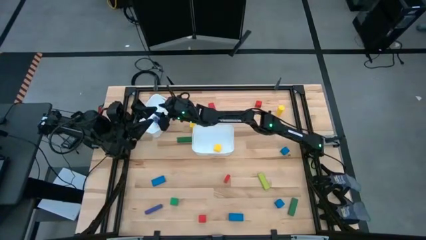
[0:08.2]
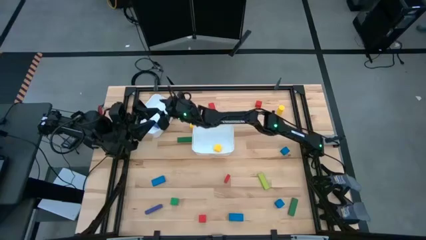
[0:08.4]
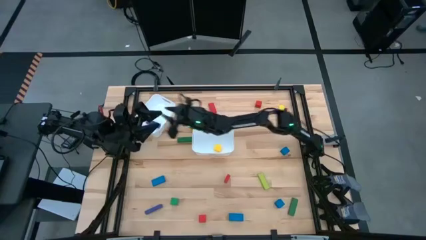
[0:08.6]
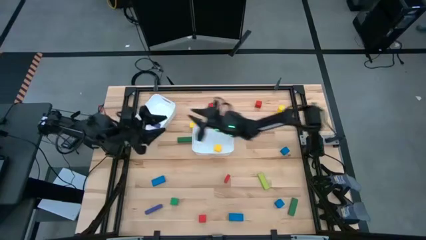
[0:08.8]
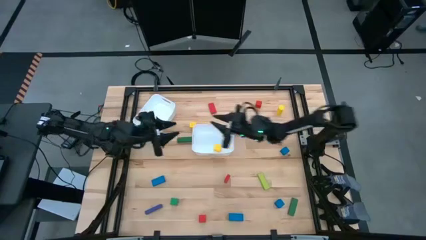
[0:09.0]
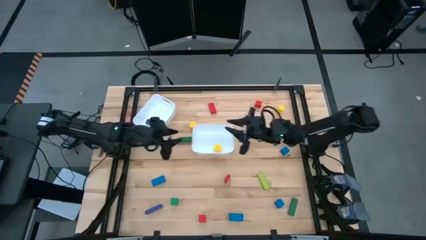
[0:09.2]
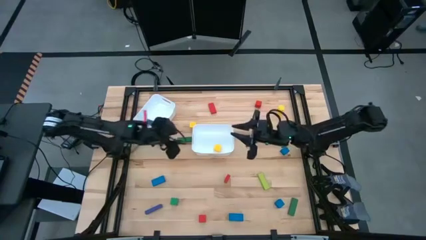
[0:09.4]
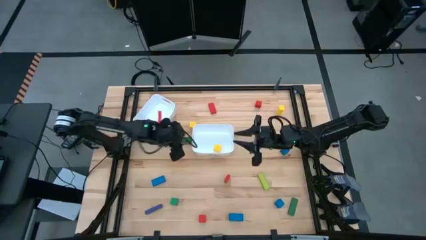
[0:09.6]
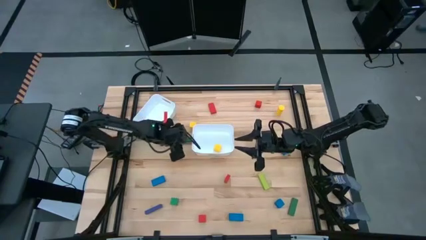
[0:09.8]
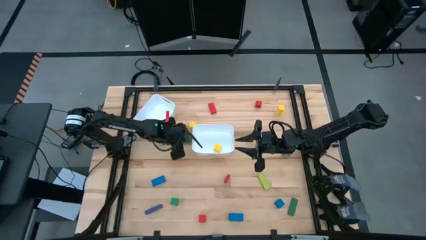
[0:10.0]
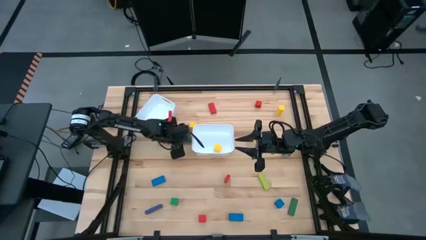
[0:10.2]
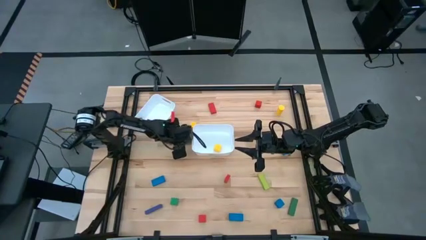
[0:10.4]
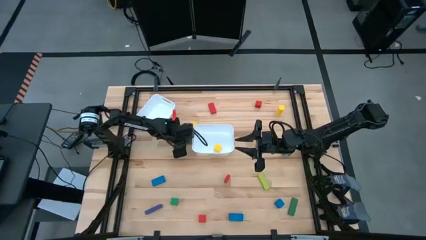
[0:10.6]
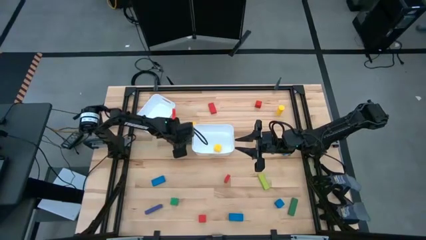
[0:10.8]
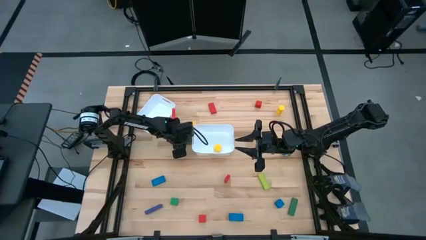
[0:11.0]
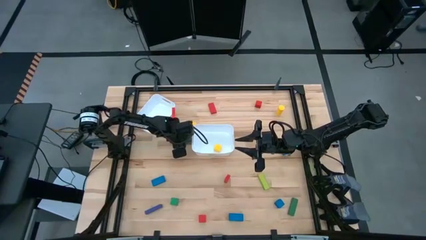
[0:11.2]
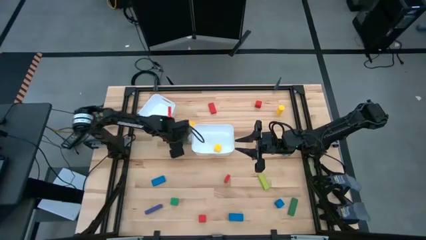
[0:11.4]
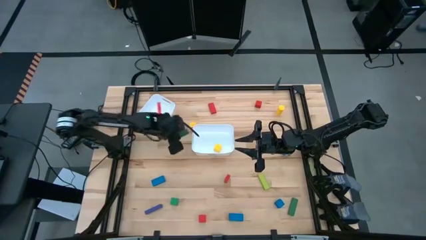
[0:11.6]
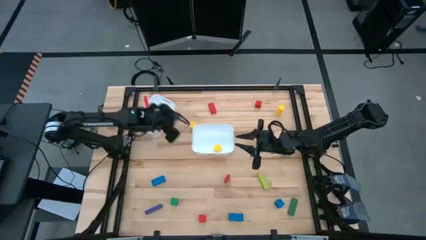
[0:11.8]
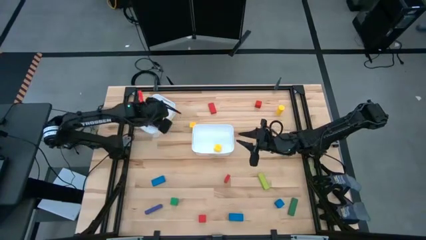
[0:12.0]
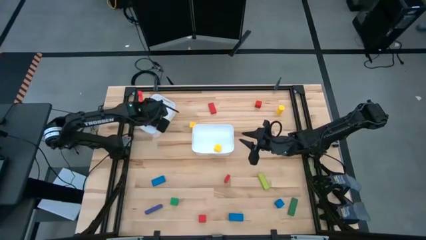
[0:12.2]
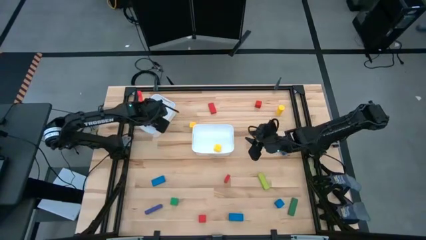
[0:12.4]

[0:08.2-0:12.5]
Task: Sort blocks by size
Put the top green large block into the top white bin

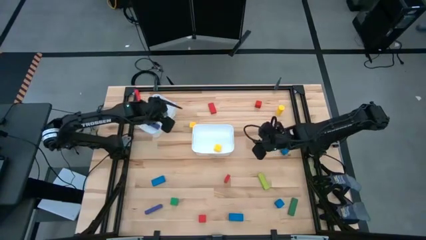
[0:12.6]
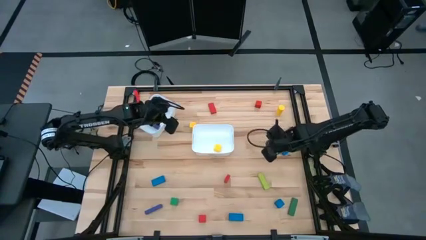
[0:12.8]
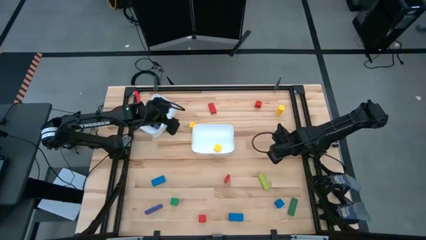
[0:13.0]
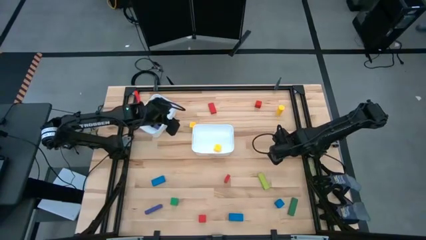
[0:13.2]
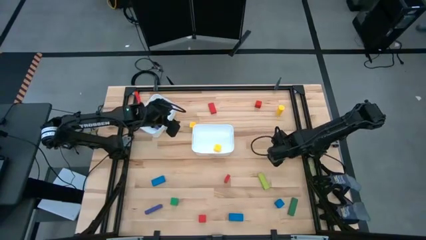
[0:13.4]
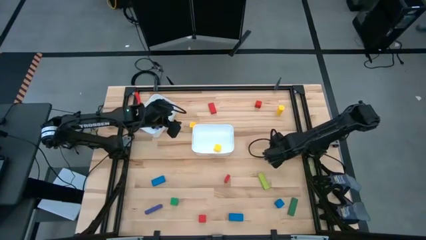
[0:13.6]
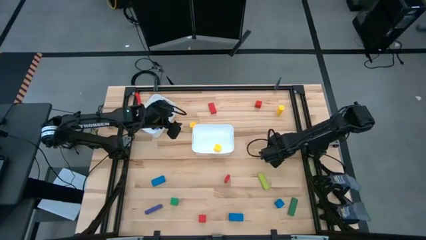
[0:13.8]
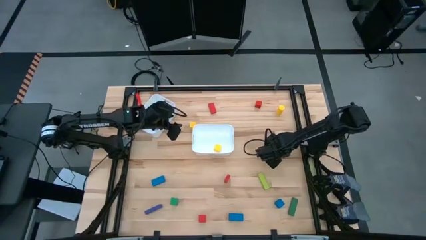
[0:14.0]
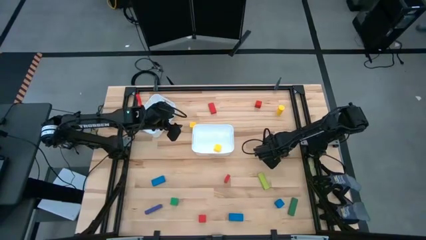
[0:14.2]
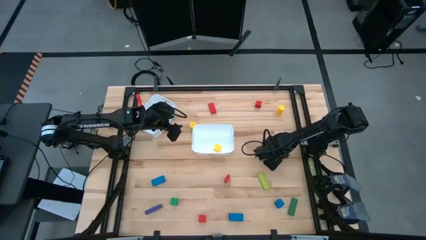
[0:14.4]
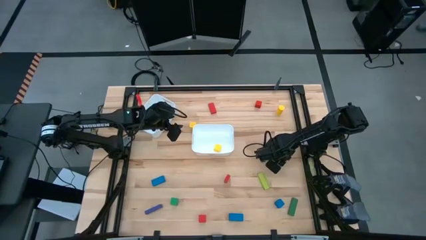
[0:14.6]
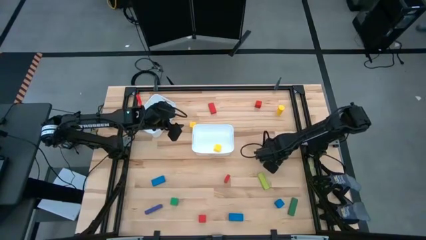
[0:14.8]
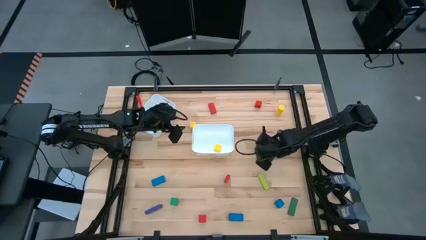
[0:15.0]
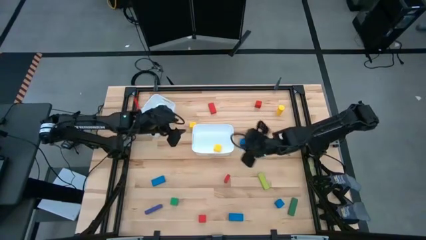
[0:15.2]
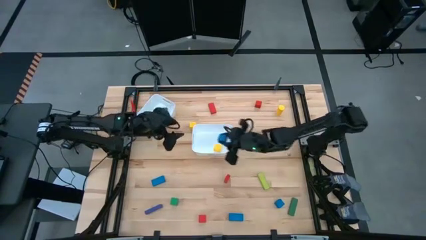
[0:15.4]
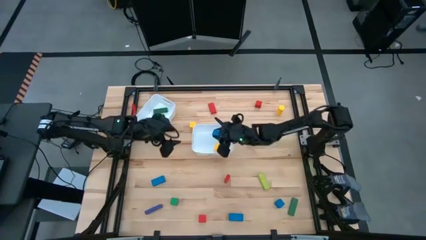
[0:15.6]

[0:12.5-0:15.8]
Put the top blue small block into the bottom white bin

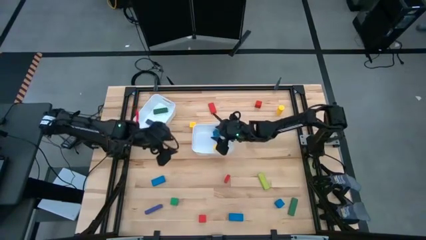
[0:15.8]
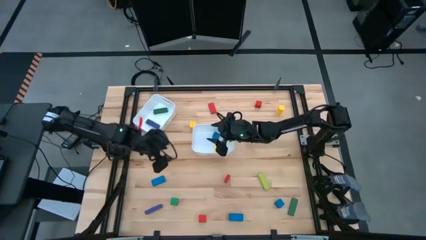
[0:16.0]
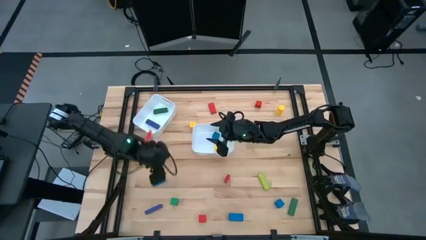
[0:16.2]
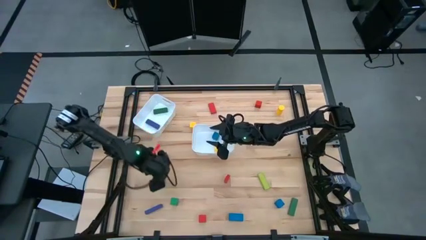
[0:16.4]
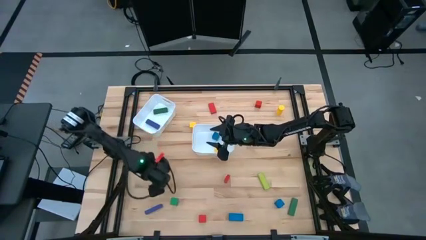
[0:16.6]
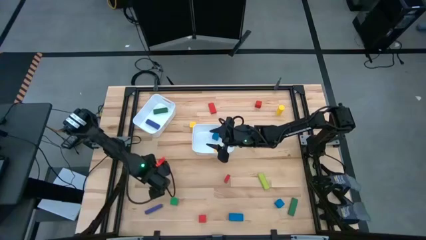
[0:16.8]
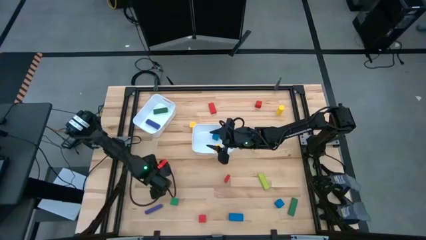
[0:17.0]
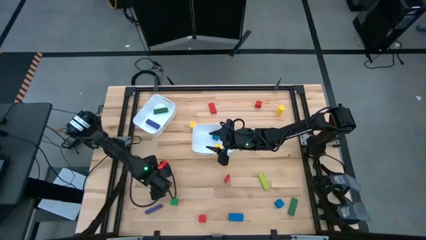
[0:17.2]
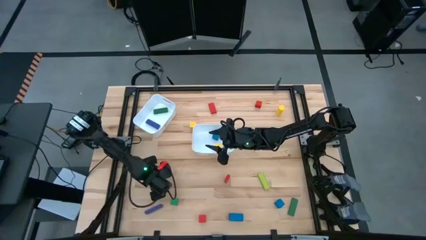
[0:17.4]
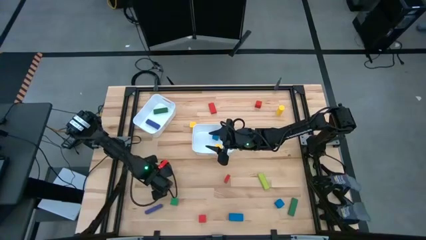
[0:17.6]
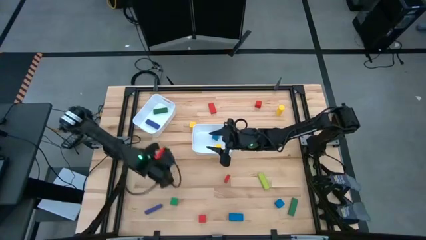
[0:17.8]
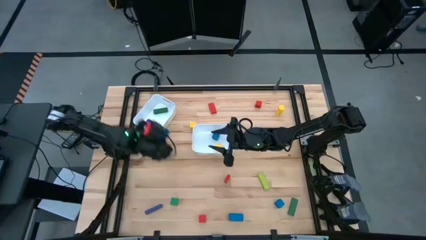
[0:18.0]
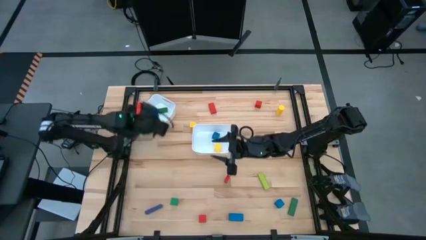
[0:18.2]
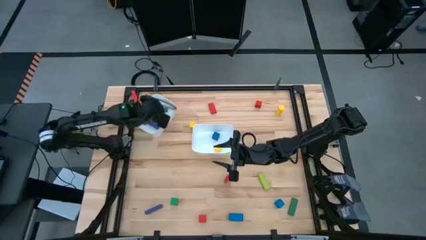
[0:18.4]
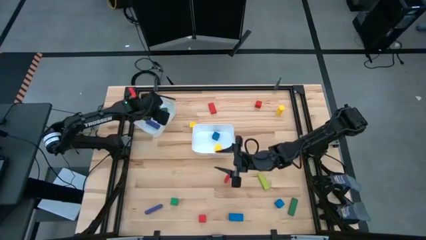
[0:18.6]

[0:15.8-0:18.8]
Put the top blue large block into the top white bin

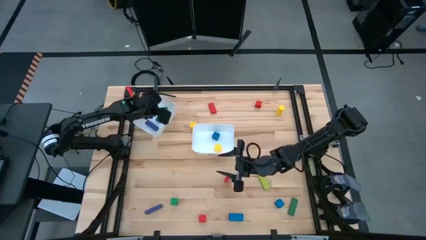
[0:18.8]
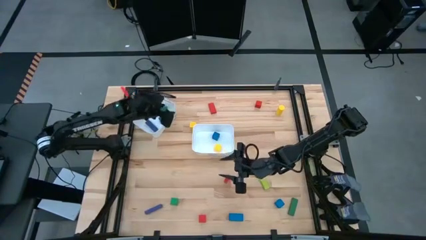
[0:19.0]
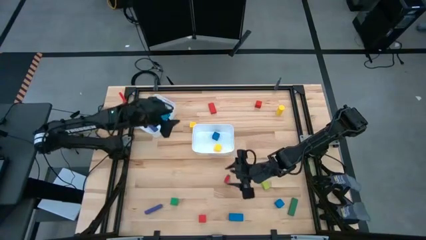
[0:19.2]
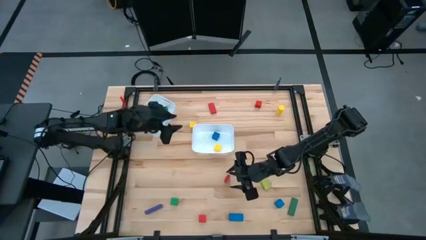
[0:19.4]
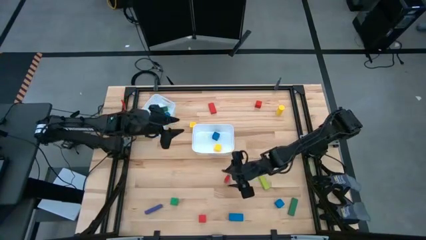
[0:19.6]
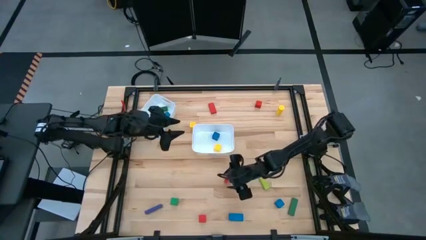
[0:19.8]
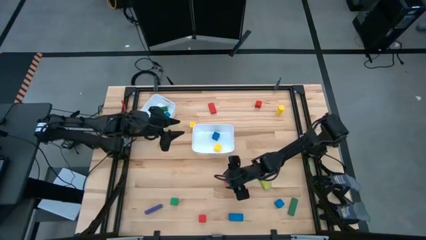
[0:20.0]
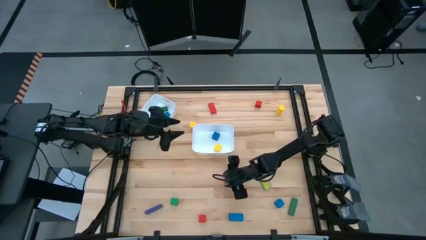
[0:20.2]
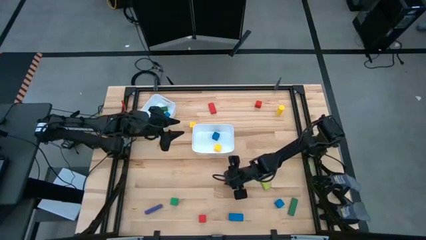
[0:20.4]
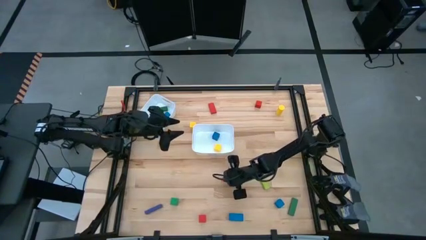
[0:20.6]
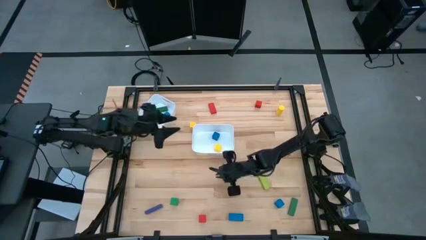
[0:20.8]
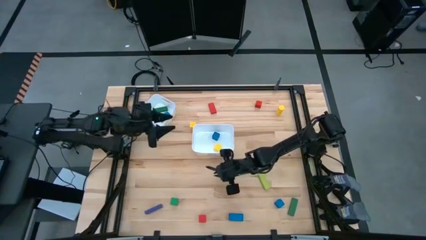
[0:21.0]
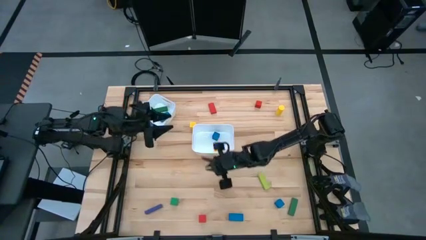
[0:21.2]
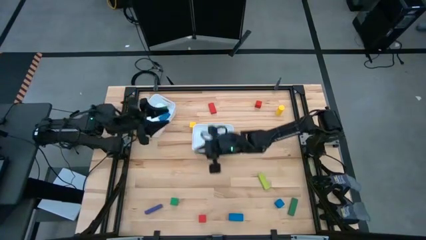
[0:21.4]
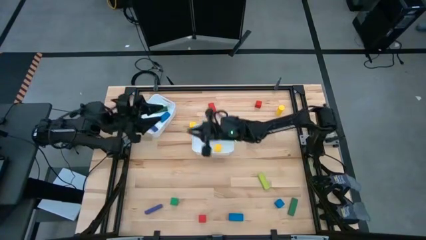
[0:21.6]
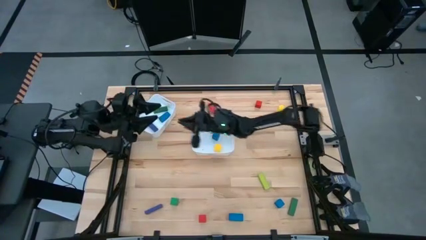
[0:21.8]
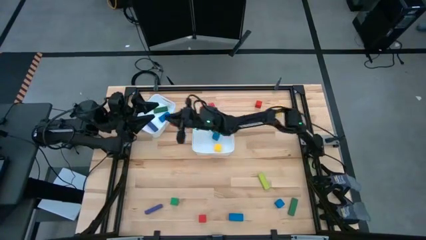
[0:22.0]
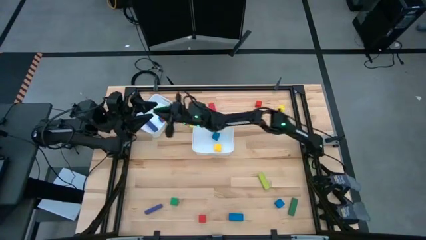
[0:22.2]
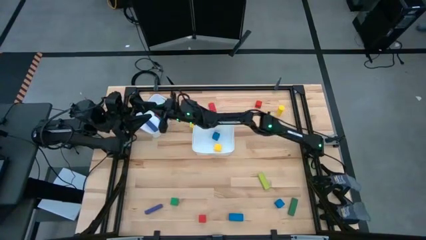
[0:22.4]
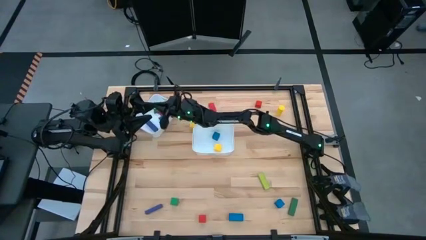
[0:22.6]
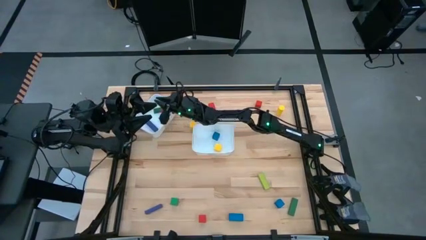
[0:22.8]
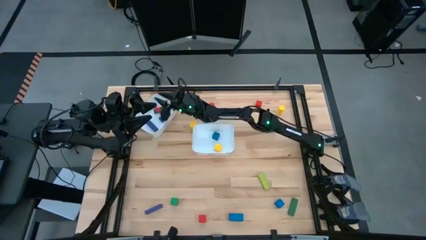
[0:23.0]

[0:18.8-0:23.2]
Put the bottom red large block into the top white bin

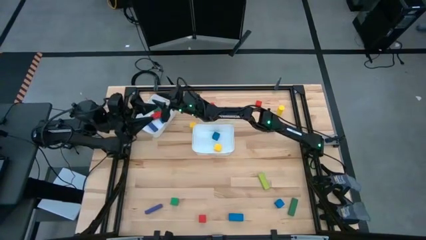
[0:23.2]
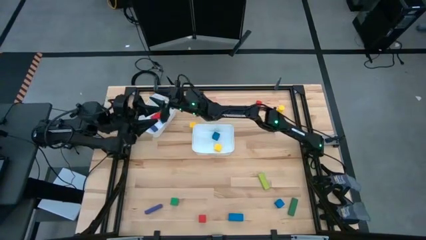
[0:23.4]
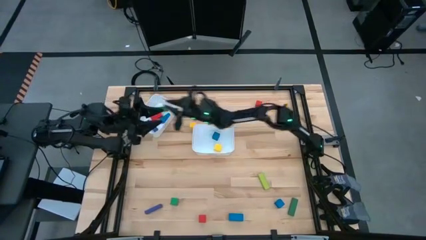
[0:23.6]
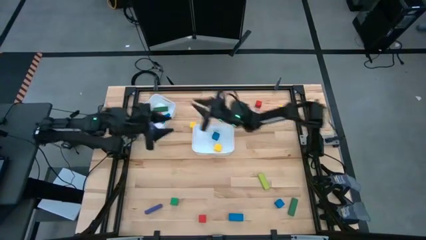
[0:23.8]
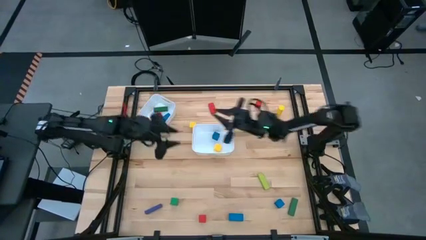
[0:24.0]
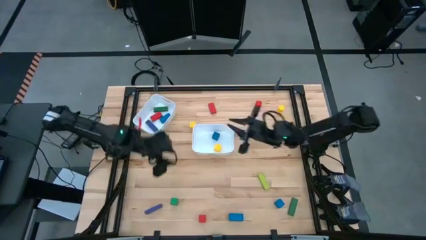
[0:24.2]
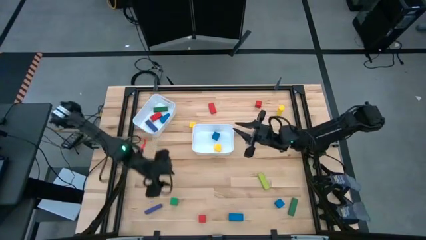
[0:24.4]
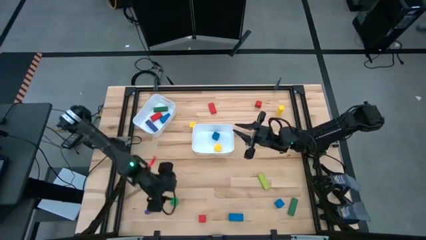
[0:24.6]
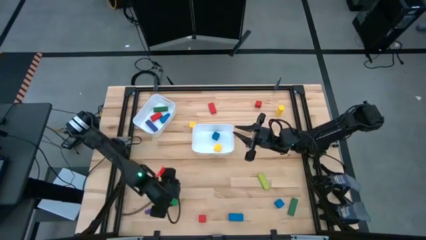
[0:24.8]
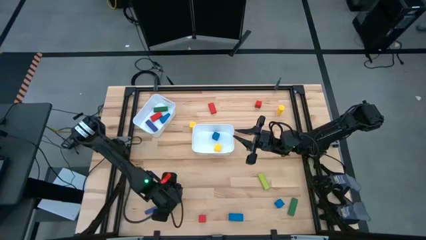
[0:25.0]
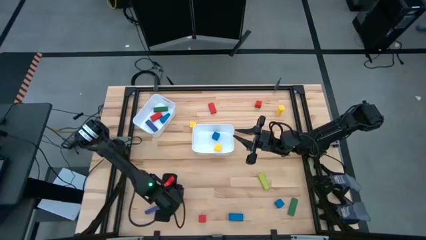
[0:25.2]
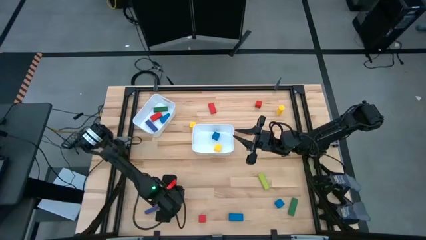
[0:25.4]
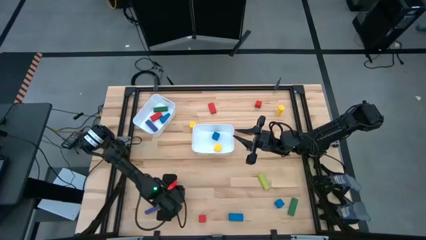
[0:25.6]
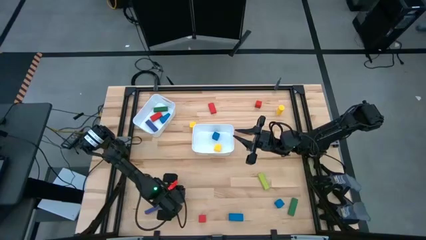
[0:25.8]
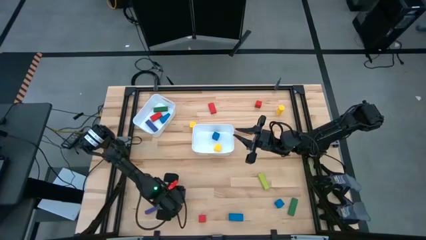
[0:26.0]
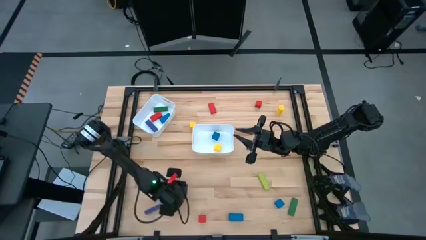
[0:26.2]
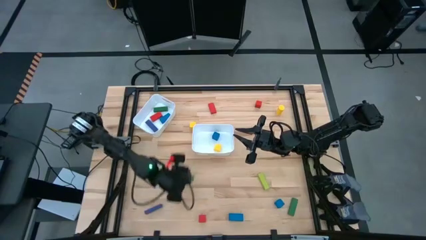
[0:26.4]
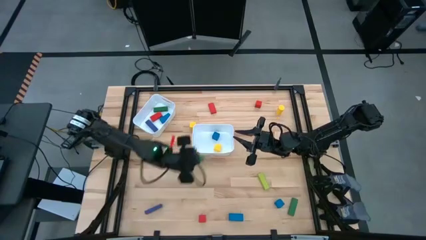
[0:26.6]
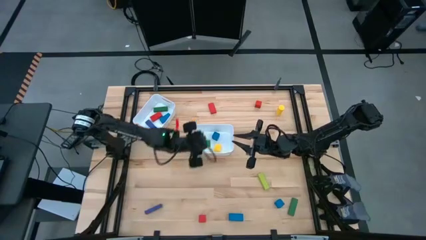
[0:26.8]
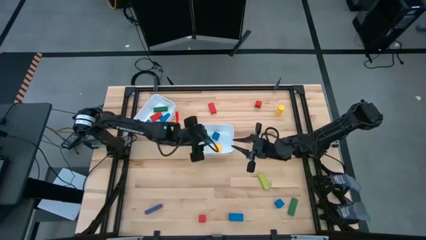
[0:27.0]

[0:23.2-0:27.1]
Put the green small block into the bottom white bin
